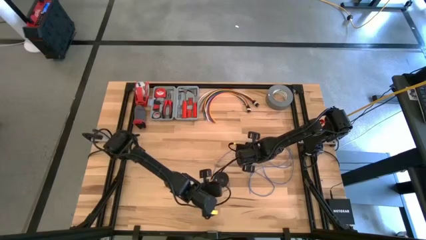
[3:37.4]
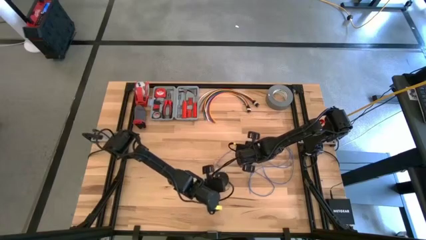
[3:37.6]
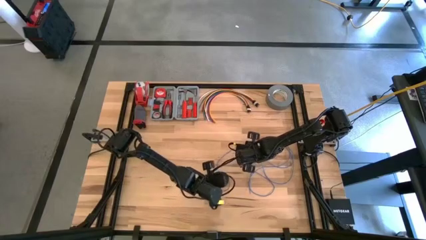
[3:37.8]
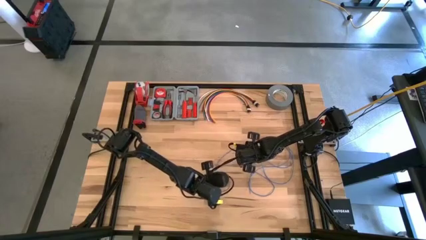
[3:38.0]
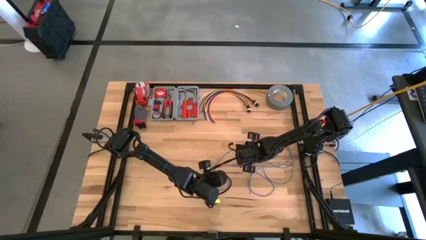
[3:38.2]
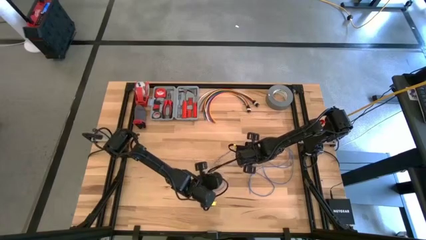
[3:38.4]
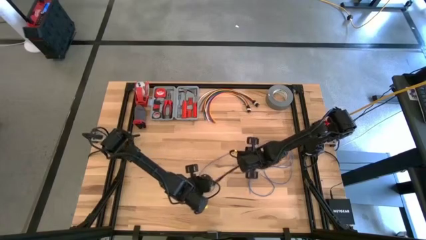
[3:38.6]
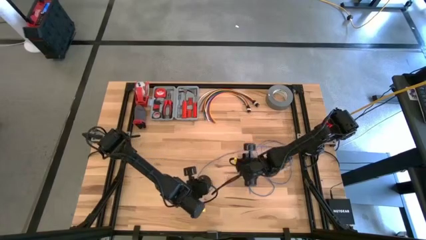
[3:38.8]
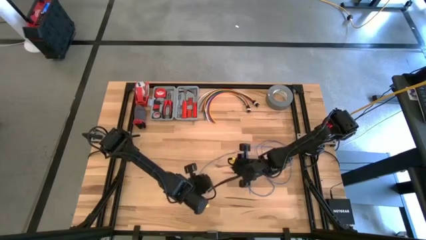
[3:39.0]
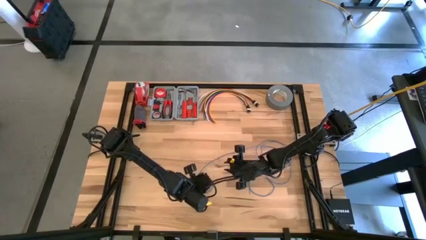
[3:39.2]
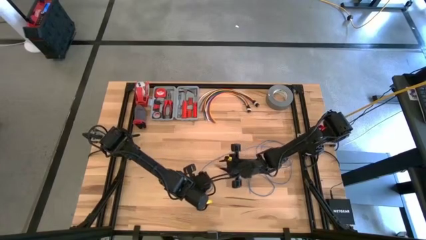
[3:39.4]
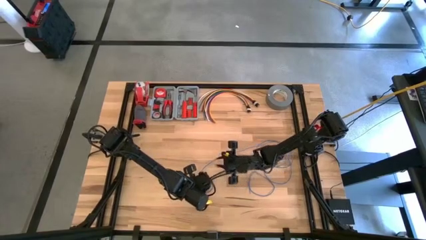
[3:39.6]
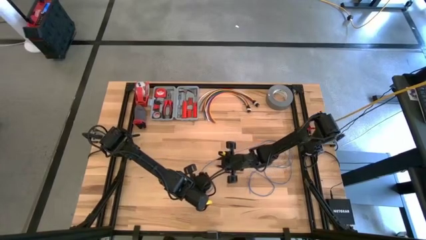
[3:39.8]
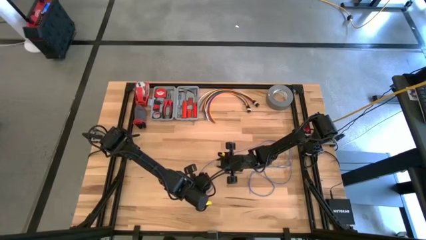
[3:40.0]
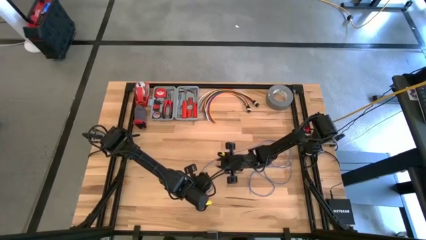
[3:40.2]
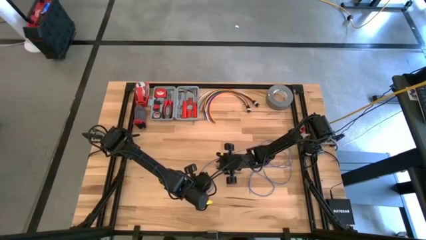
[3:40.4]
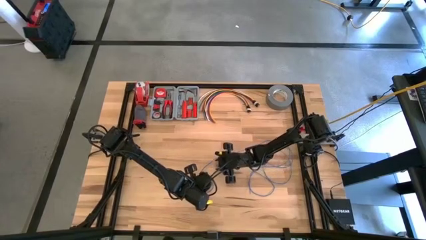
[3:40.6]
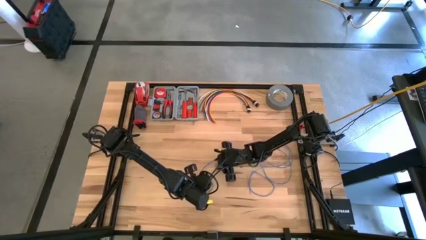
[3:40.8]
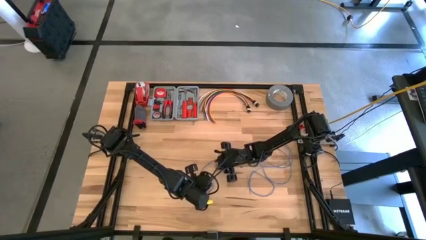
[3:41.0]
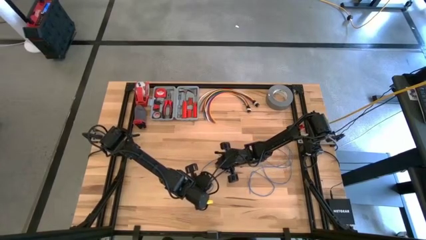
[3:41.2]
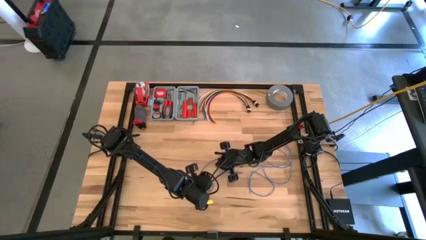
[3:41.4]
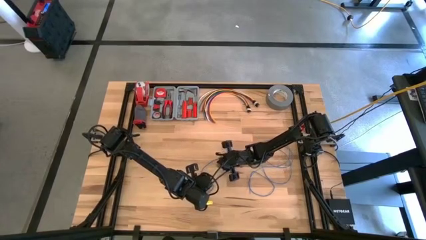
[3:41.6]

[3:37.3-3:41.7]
Task: Coil cords
Uncoil the blue wire on the black spool

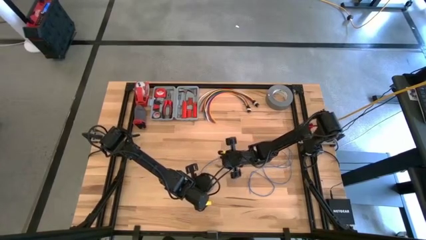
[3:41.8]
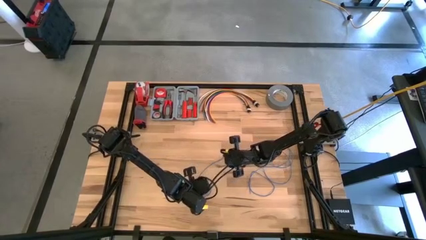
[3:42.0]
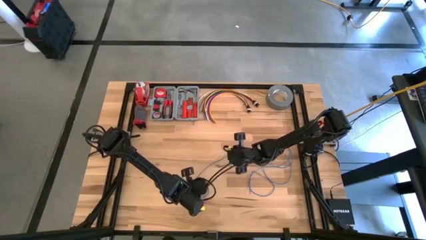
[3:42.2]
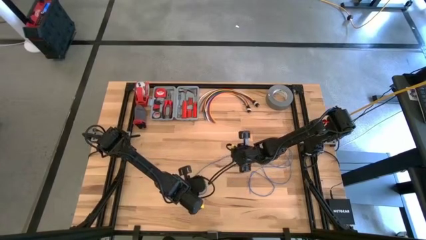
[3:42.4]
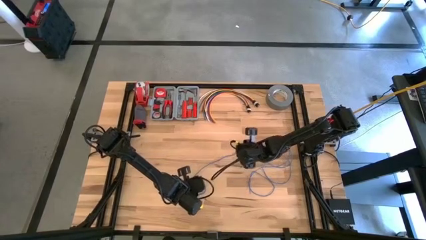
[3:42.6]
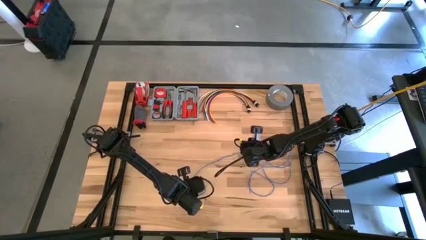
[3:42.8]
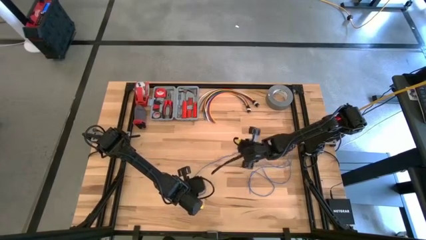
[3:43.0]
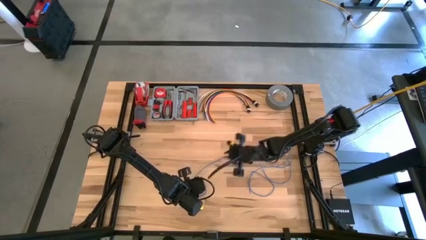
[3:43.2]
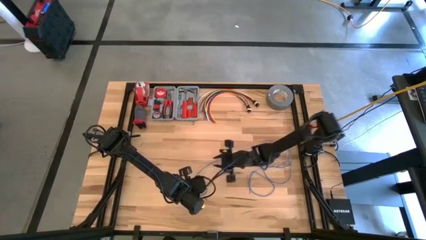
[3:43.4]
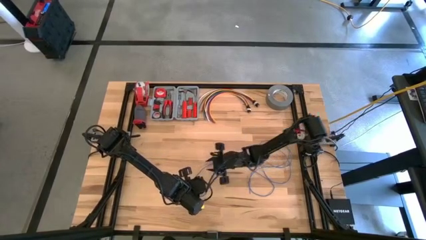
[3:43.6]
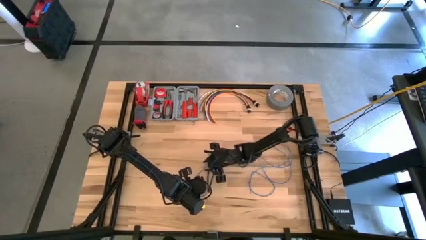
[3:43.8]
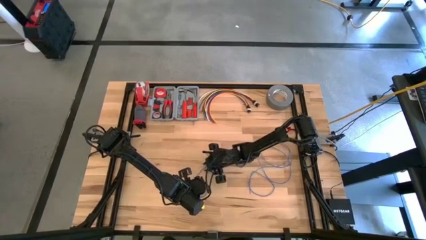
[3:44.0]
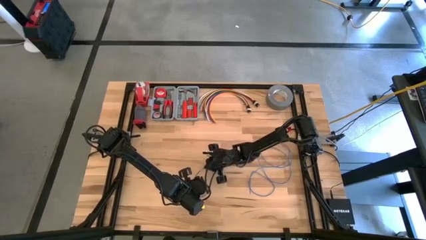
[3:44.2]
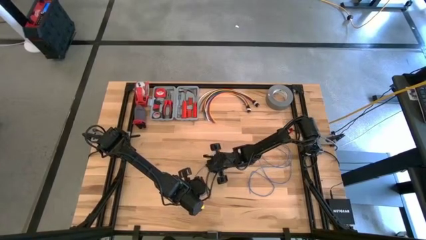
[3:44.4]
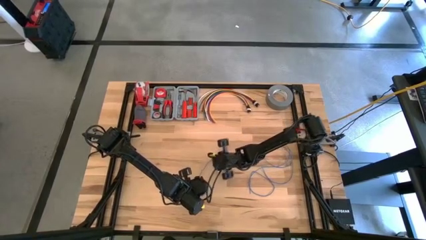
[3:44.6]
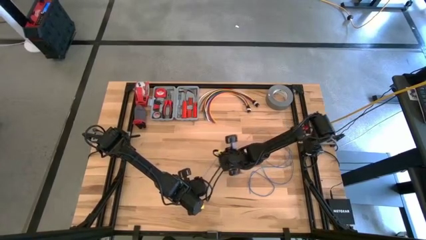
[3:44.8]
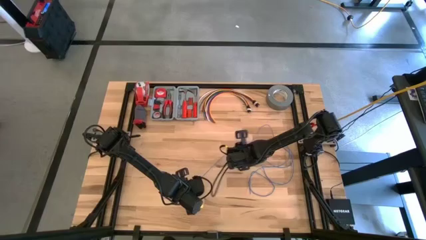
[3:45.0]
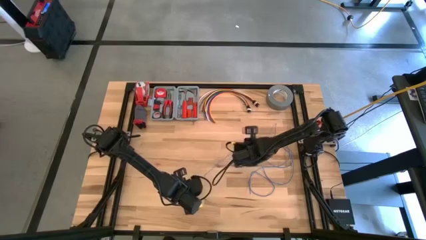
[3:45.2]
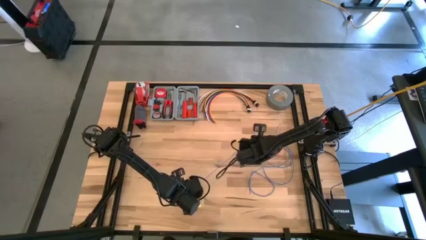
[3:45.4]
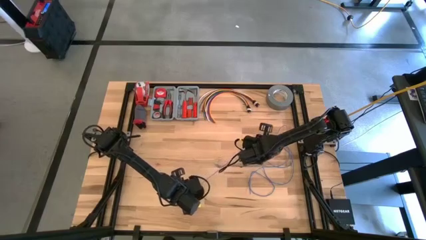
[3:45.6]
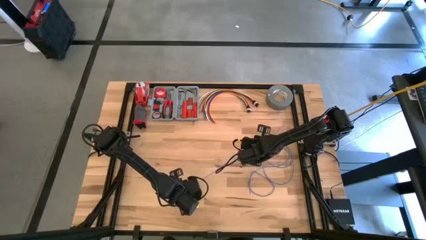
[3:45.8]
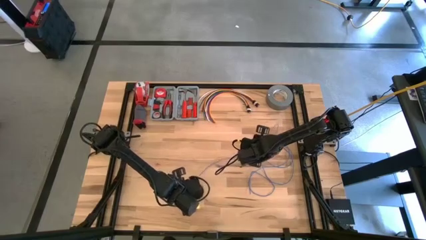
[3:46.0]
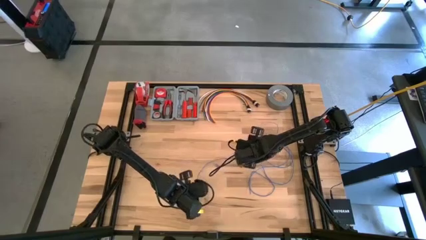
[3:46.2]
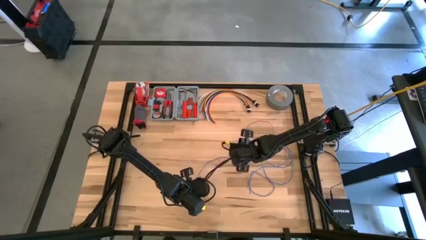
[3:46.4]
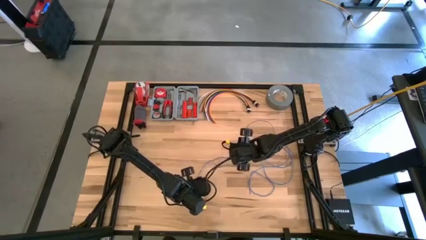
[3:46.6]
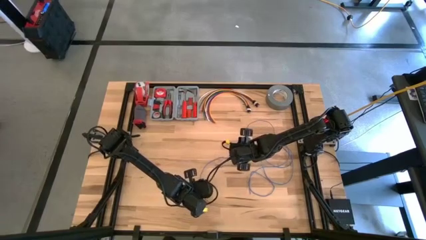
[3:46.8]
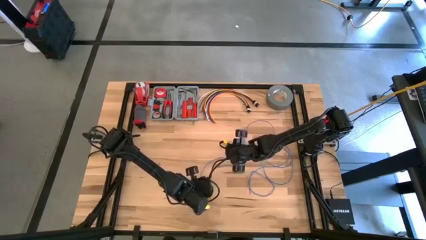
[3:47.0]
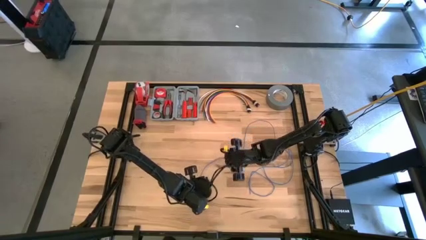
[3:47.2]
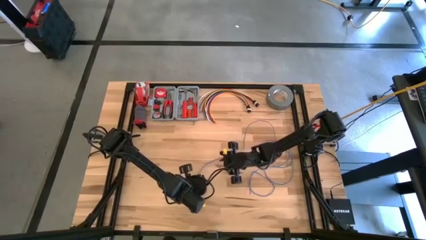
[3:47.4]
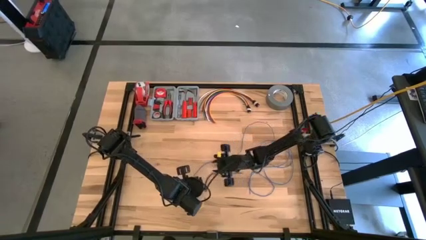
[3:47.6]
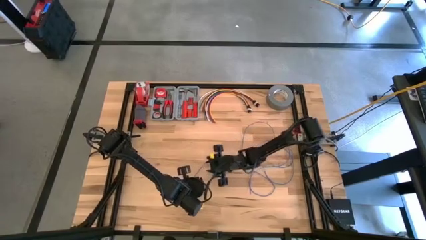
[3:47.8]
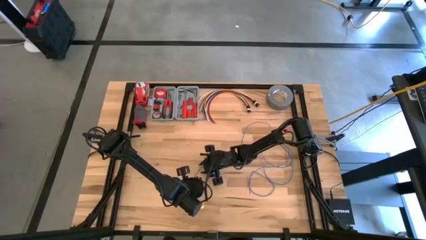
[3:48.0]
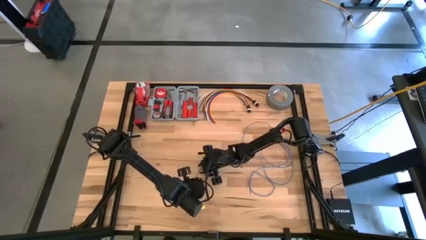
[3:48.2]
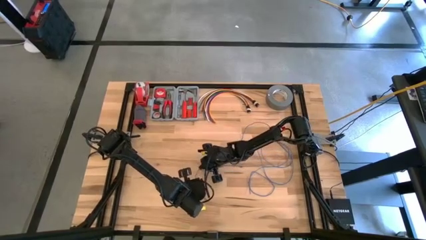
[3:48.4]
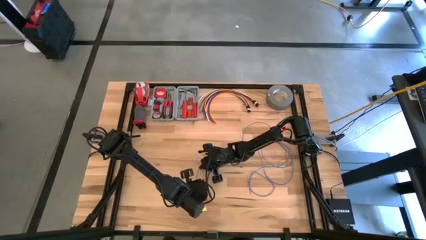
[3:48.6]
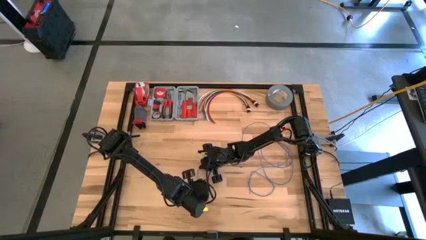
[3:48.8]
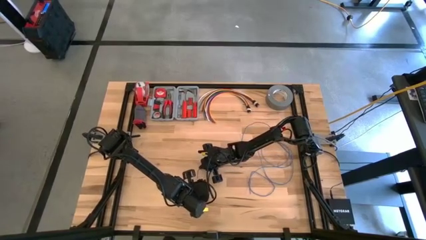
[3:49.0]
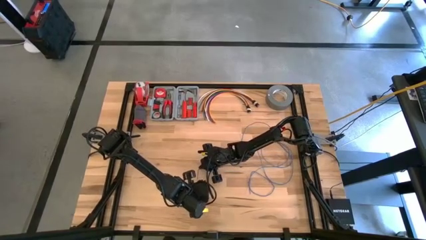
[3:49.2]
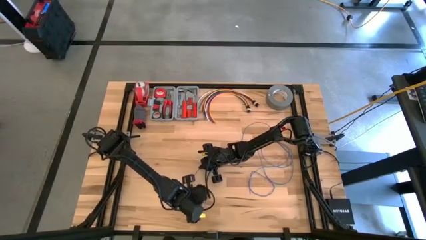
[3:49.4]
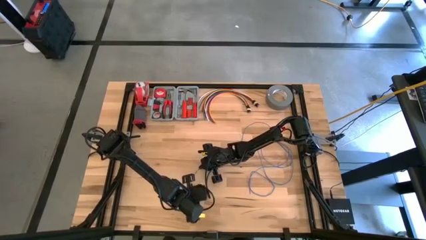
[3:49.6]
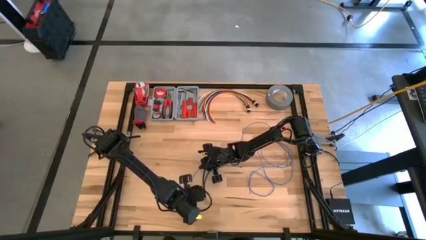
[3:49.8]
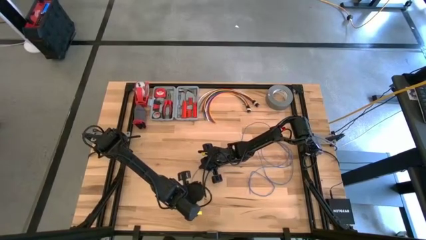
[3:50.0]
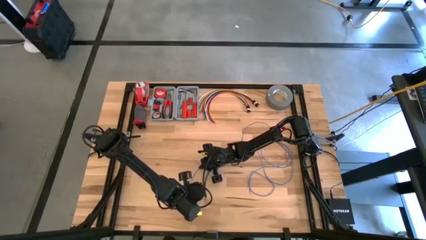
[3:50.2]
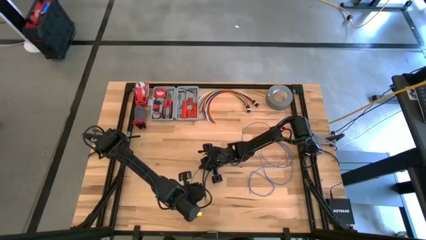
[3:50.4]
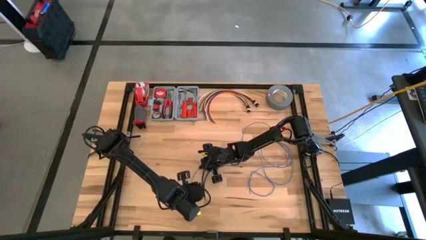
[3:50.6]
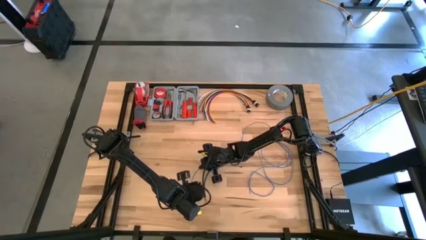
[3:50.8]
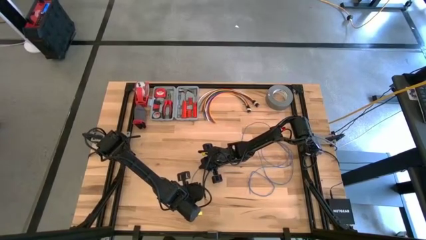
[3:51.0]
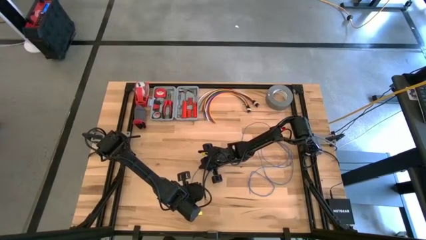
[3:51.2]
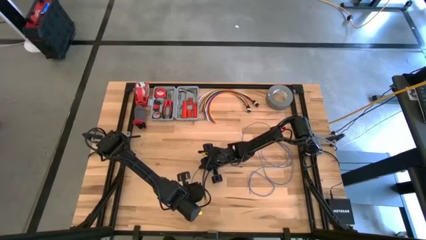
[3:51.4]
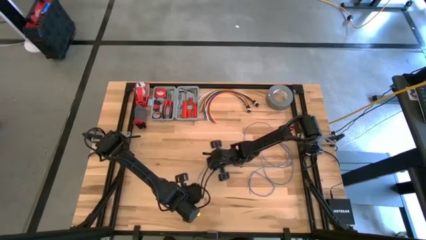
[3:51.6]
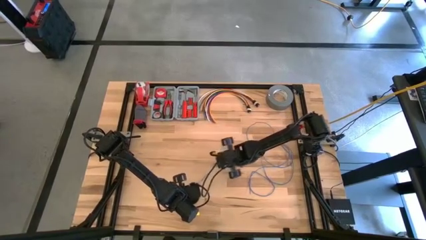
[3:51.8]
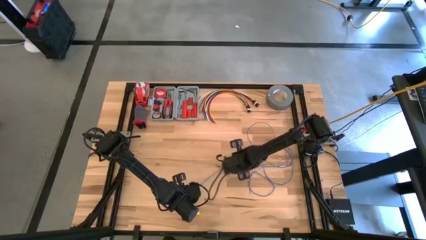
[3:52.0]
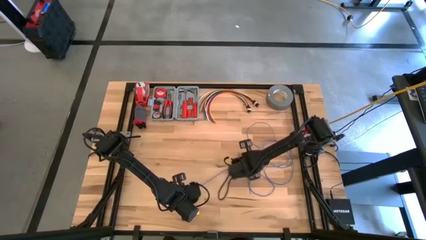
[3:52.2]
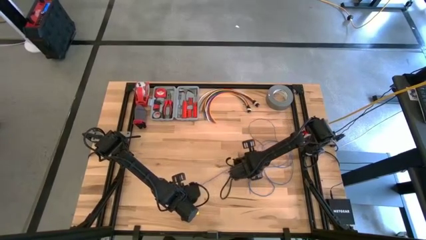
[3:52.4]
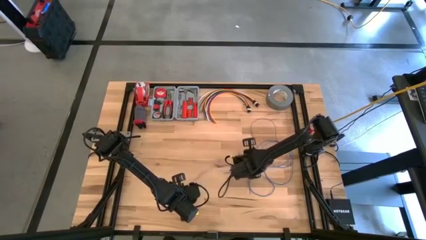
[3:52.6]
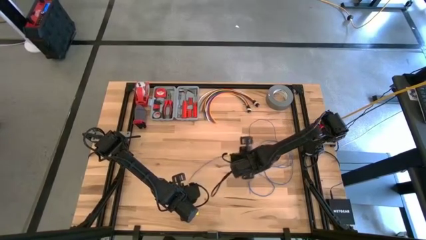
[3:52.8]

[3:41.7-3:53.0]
Uncoil the blue wire into the black spool

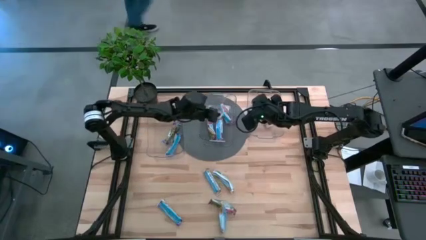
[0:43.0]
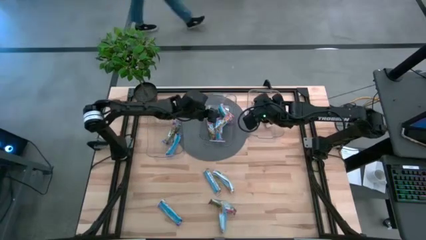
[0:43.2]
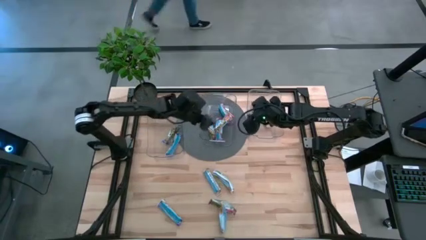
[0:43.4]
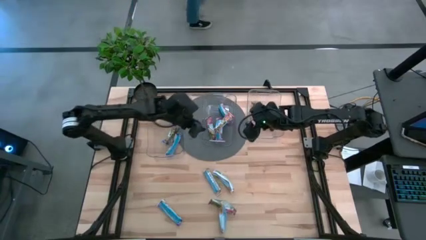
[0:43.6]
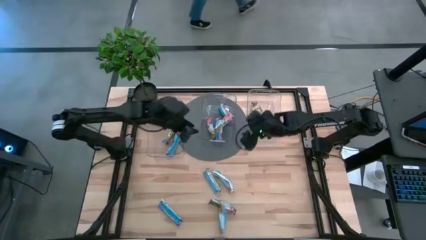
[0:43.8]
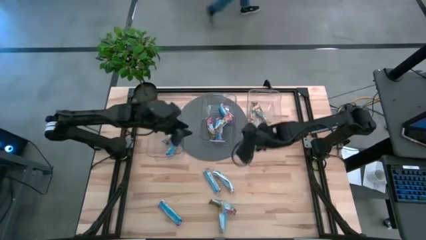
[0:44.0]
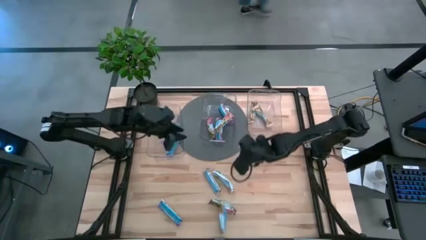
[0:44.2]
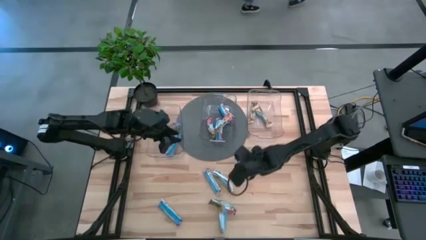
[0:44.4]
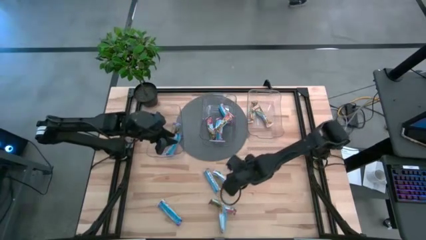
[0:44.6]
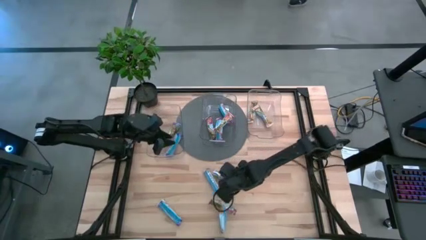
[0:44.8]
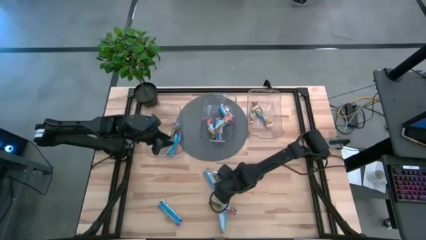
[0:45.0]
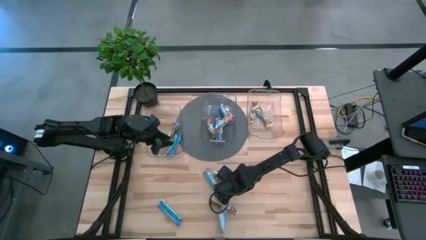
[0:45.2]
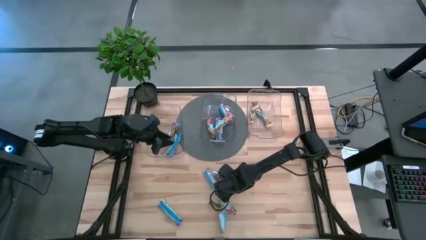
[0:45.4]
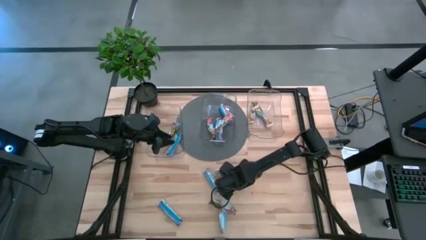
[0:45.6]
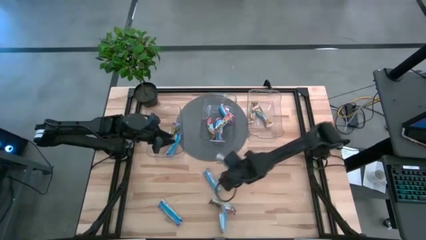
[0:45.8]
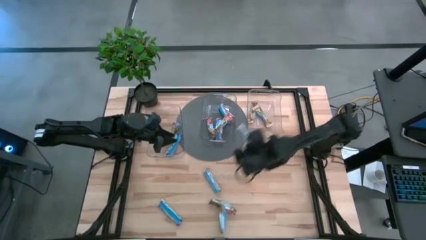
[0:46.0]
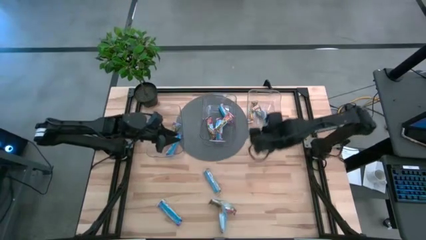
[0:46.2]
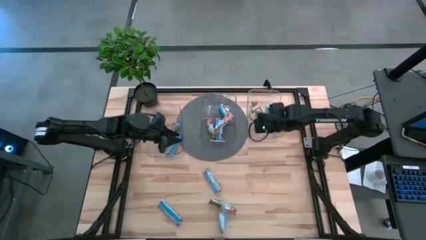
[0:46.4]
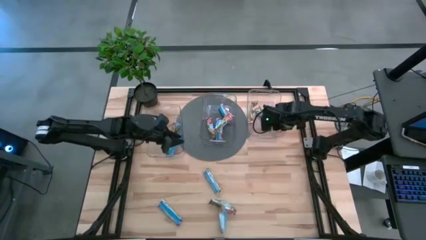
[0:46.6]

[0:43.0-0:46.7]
Task: Pick and place Granola Bars by type
Put the orange granola bar into the right transparent bin
